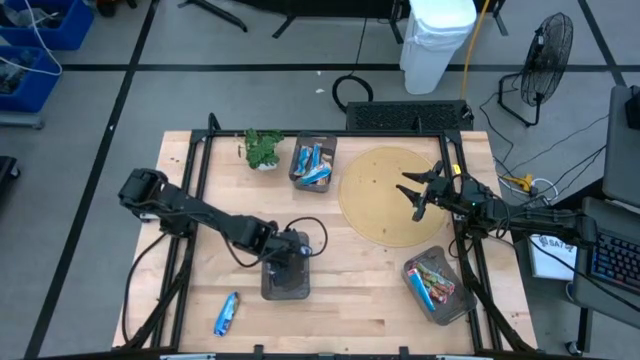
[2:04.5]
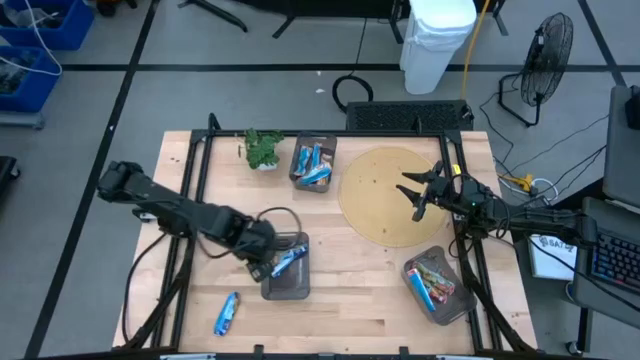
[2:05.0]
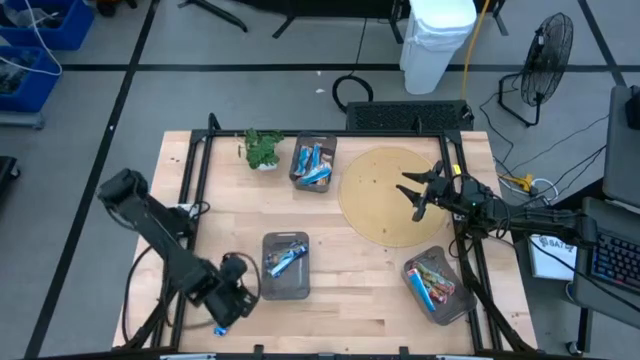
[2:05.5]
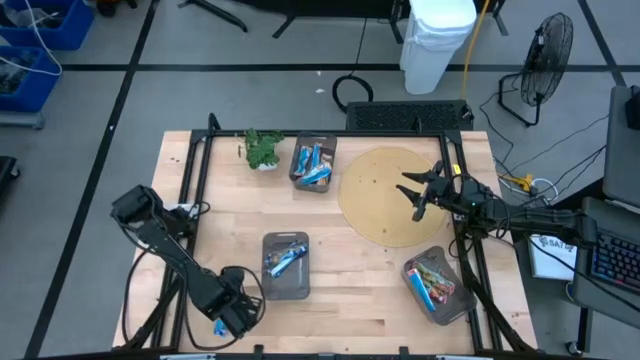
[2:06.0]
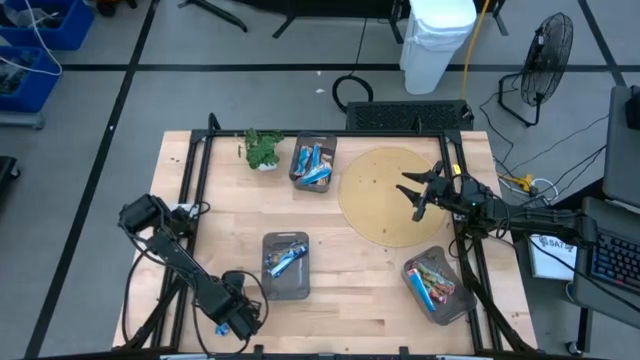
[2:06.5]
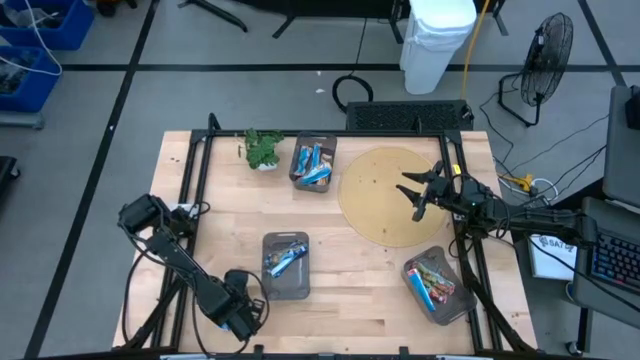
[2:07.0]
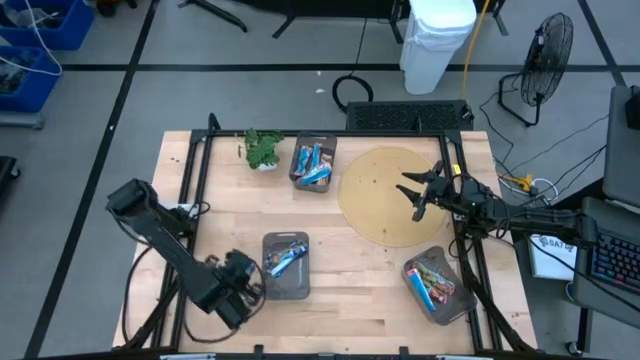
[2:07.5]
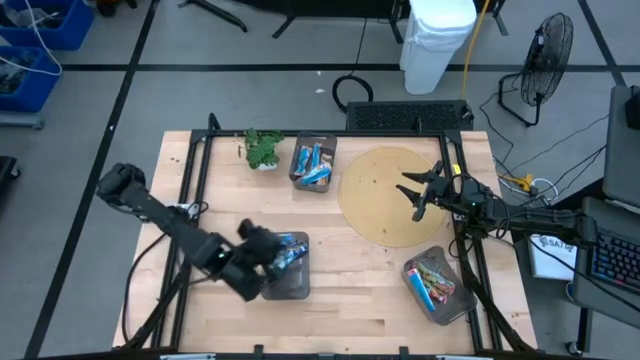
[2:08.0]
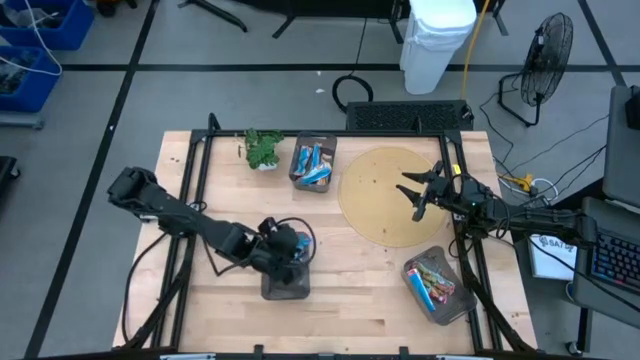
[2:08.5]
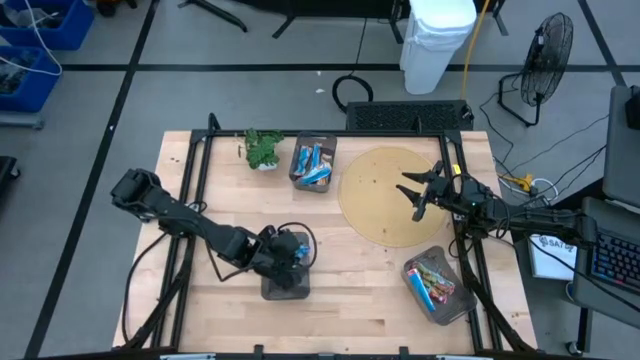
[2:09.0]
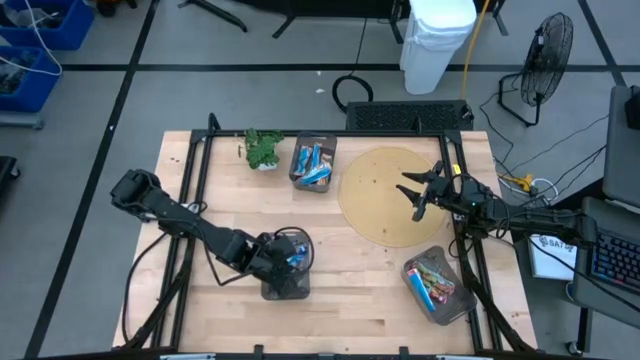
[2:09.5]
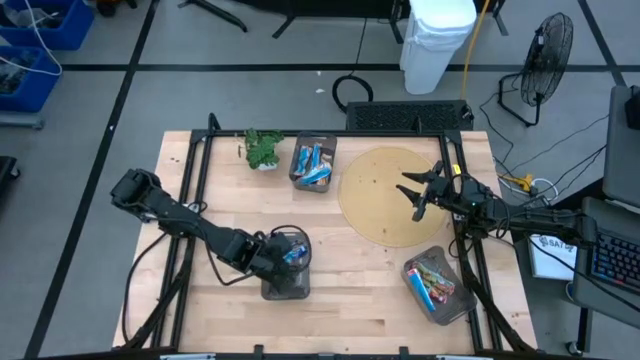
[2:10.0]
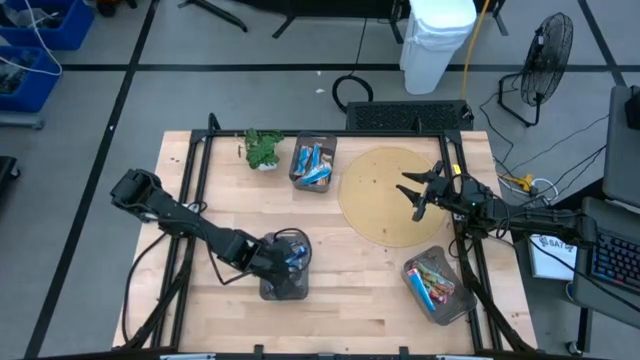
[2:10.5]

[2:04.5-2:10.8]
Task: Pick and place Granola Bars by type
Put the blue granola bar into the bottom left black bin

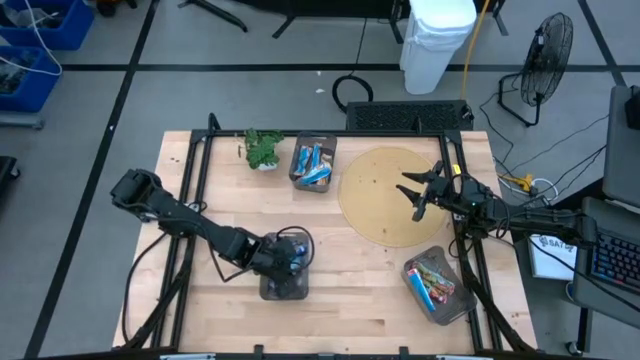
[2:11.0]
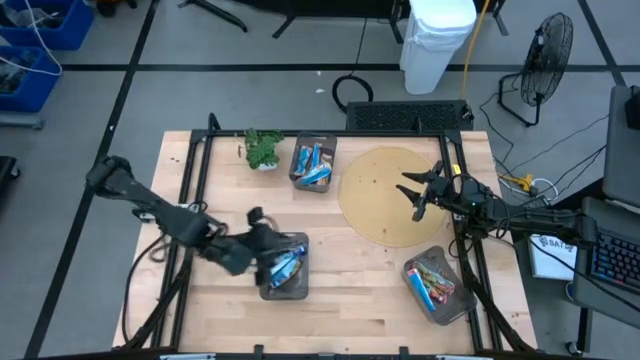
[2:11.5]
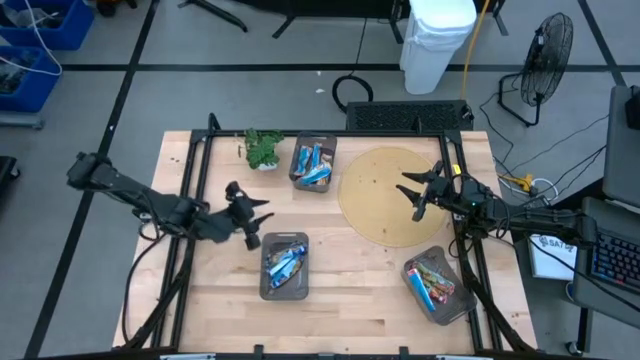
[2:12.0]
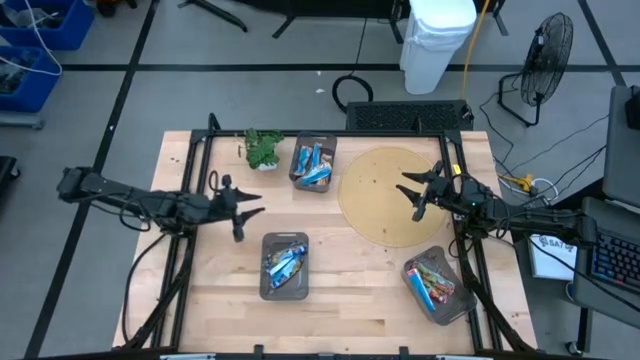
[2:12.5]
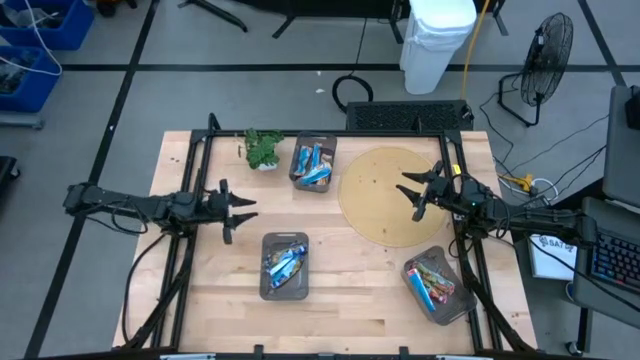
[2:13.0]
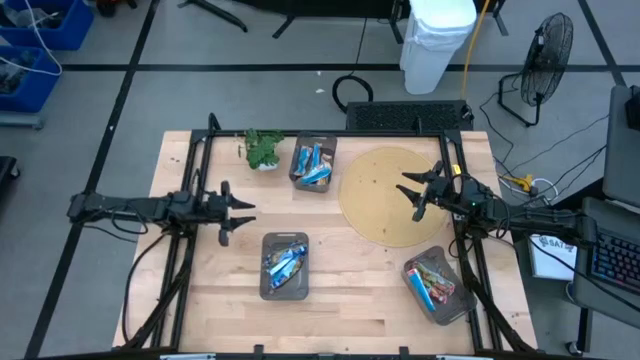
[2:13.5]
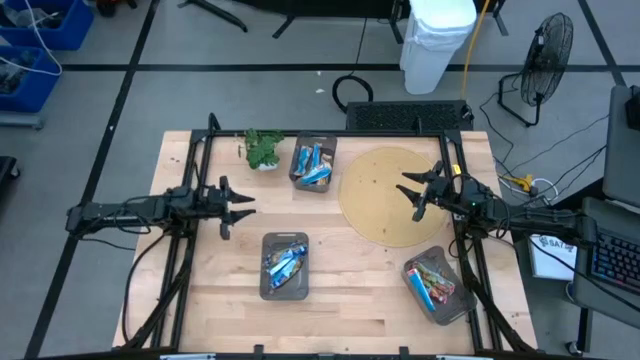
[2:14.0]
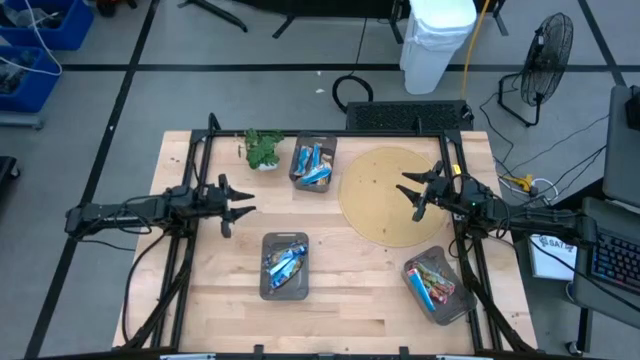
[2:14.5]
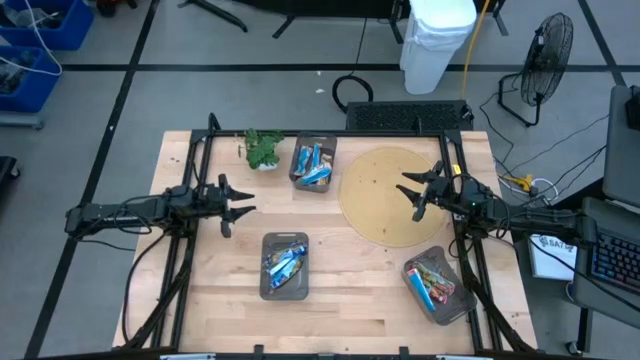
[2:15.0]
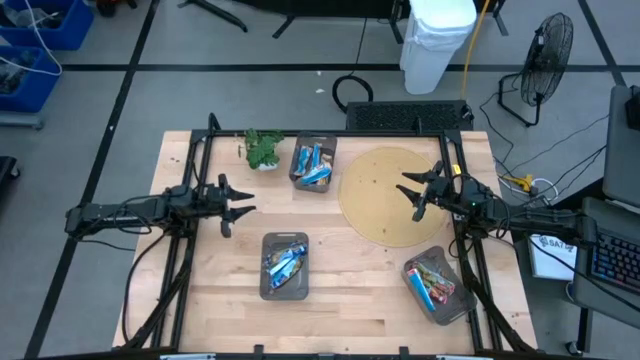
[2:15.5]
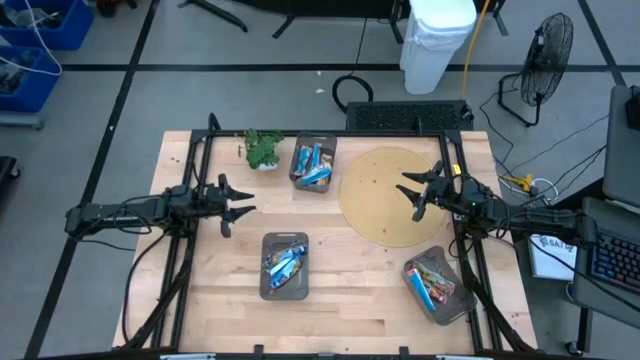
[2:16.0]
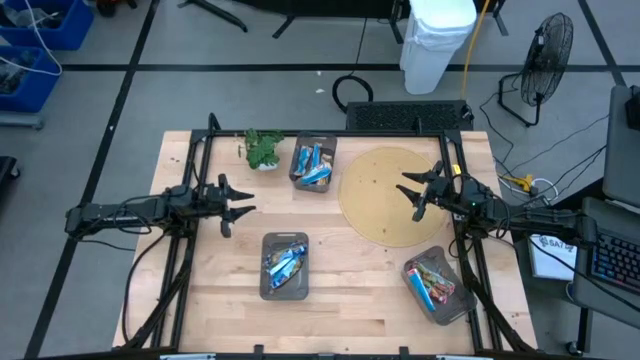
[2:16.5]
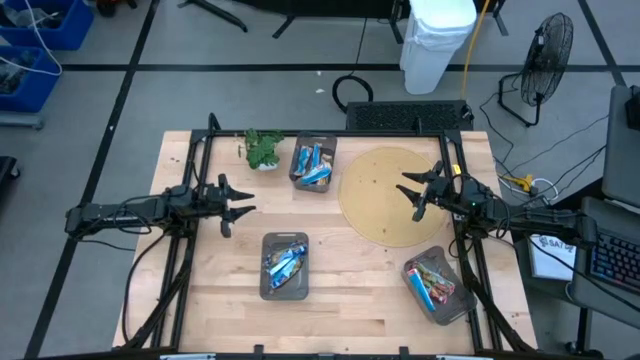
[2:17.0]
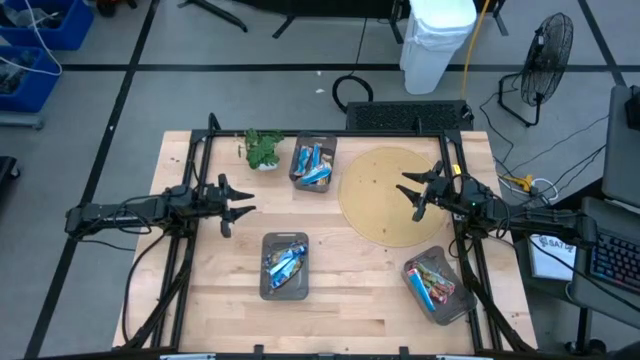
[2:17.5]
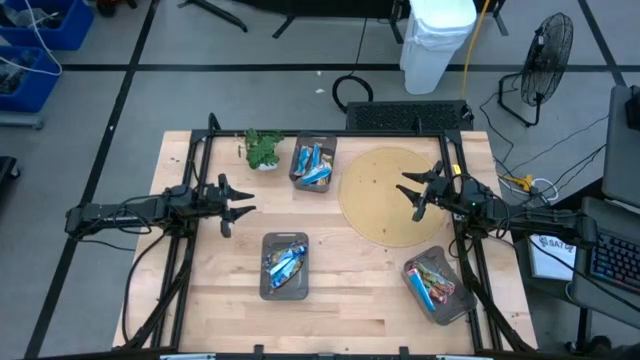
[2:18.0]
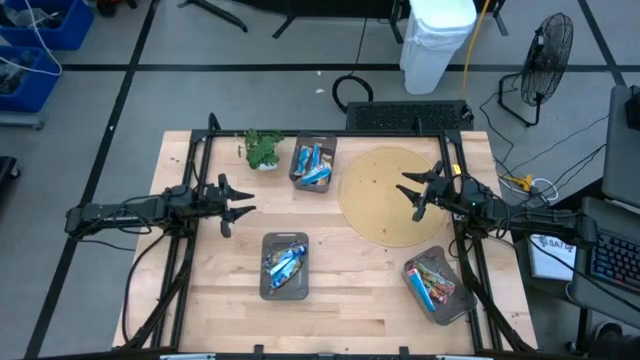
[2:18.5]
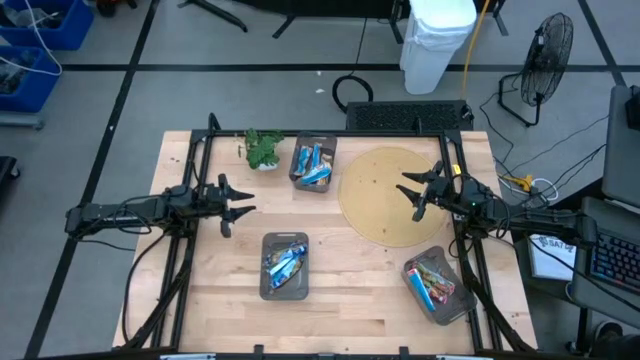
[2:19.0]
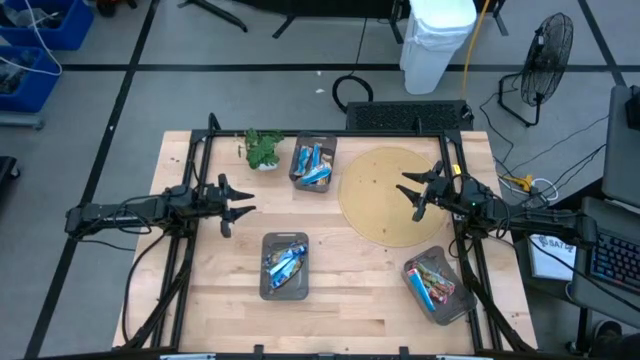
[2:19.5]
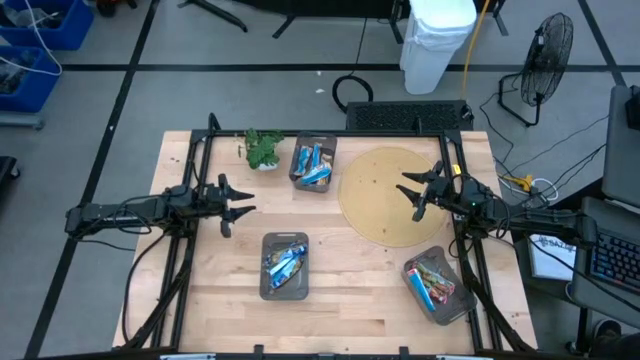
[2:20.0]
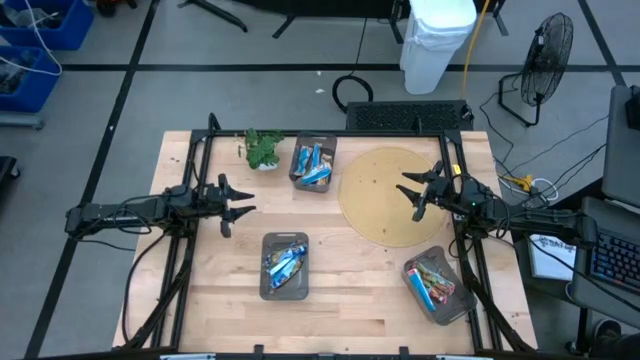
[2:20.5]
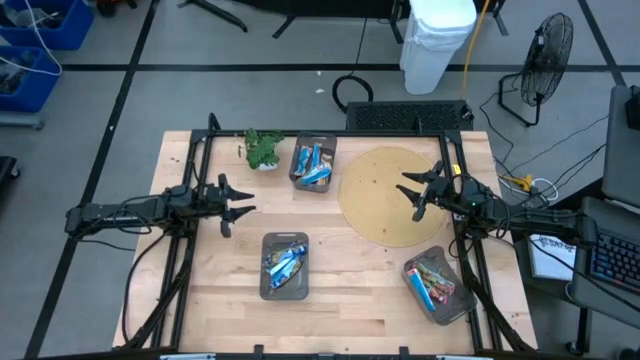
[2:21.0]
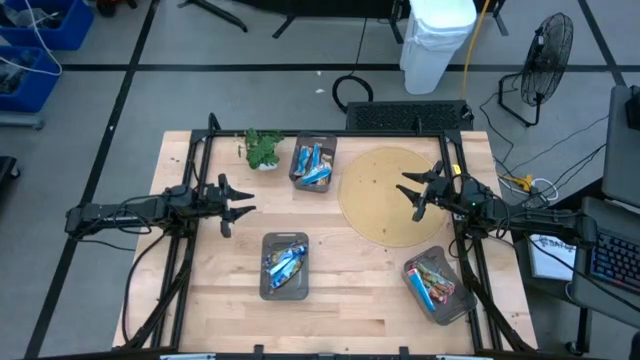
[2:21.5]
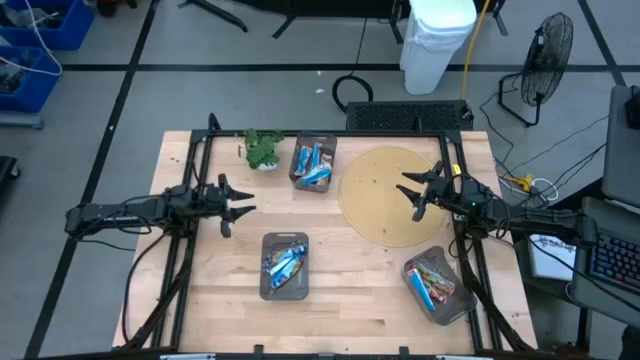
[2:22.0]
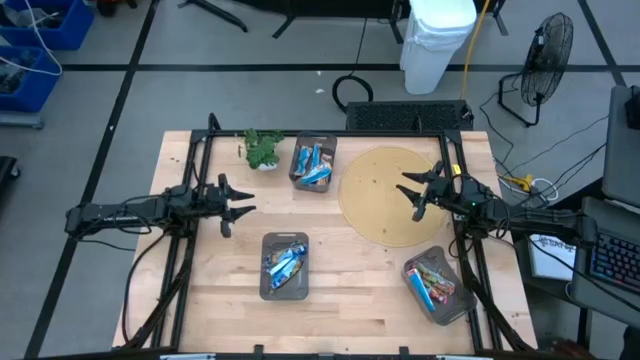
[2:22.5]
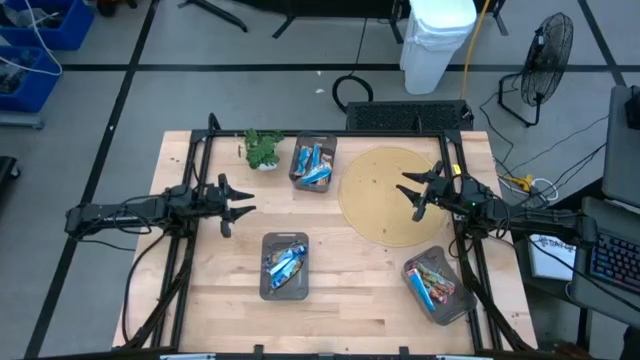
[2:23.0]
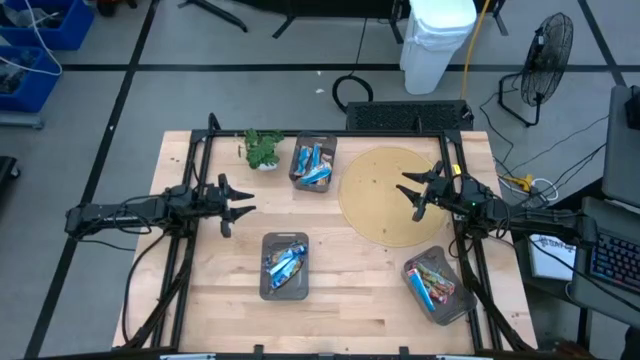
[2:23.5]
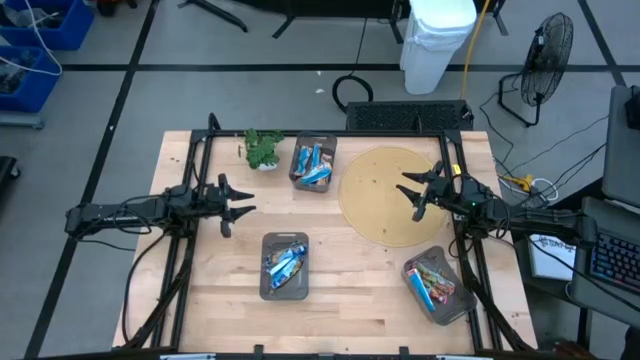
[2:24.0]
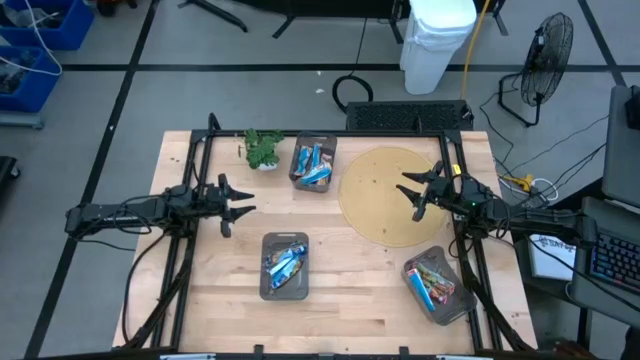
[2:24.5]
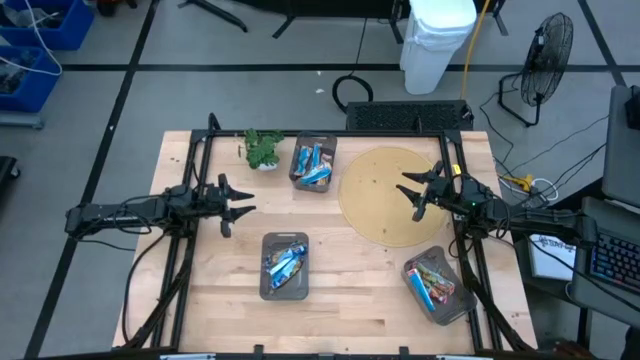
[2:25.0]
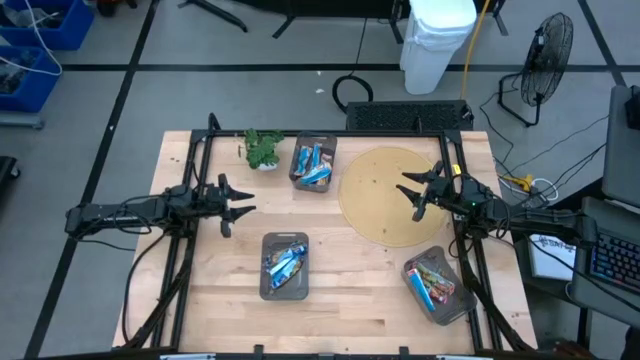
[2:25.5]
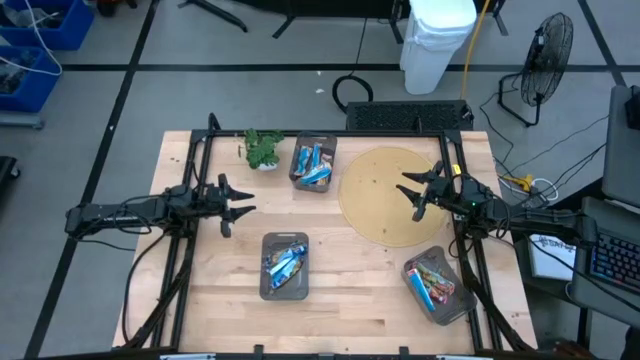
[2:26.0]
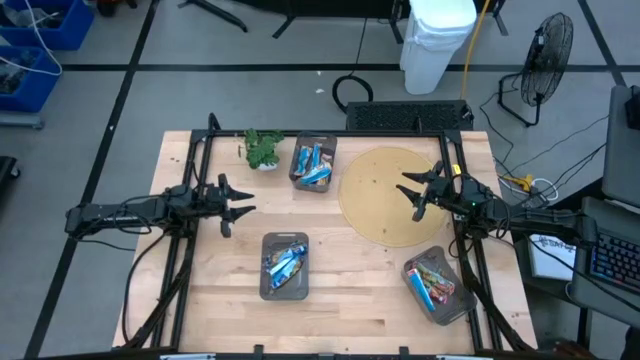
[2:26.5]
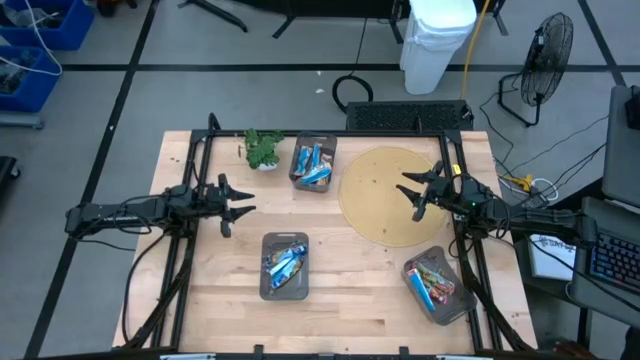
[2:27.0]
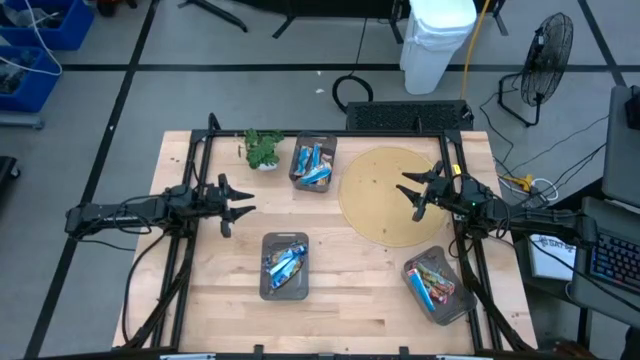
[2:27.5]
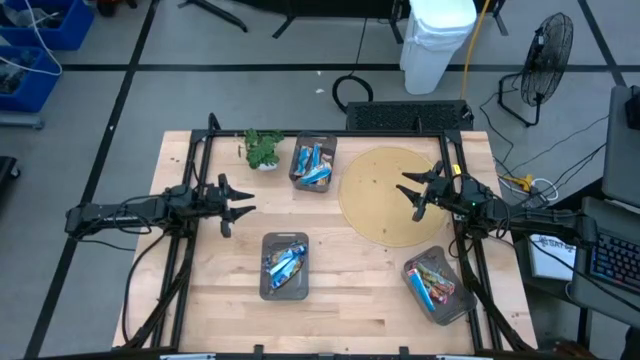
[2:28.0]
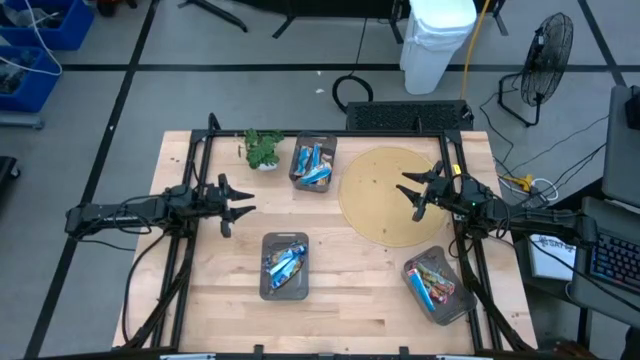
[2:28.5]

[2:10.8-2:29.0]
Return to Home Position
